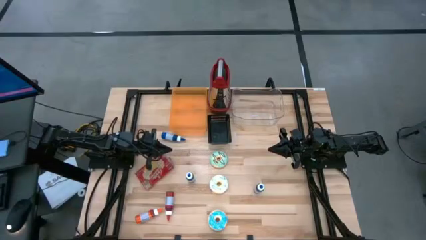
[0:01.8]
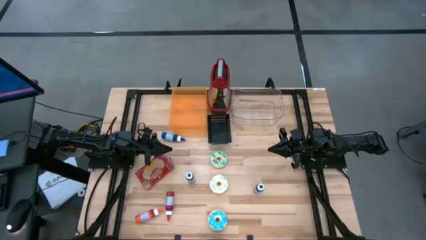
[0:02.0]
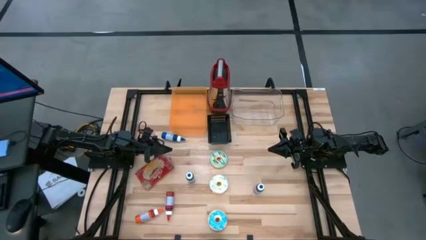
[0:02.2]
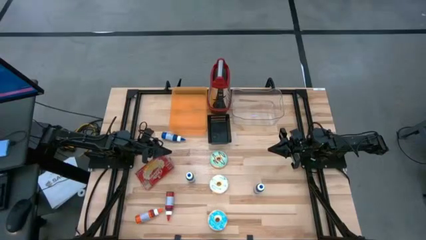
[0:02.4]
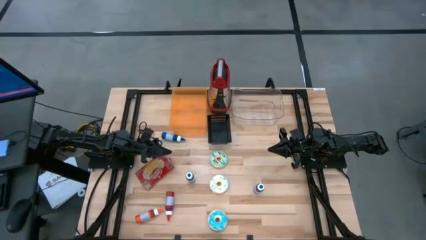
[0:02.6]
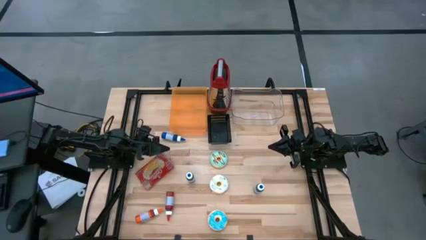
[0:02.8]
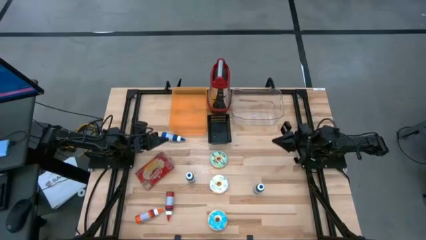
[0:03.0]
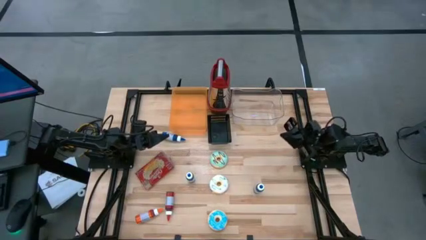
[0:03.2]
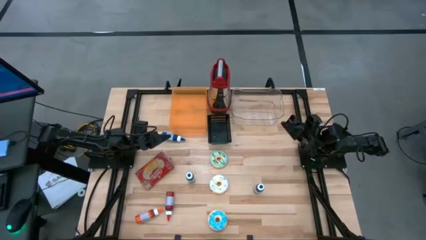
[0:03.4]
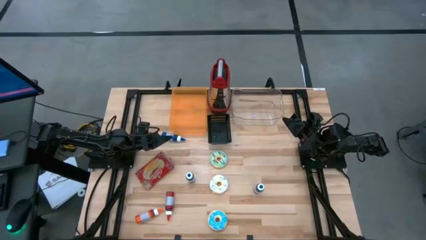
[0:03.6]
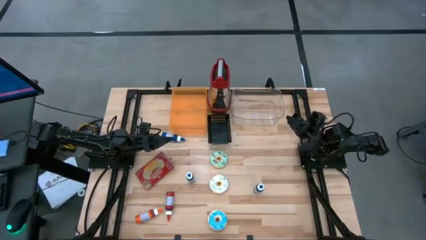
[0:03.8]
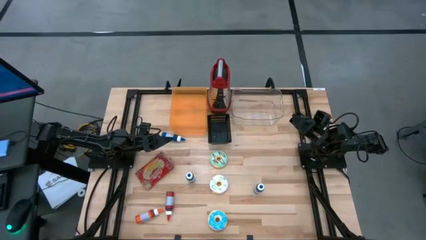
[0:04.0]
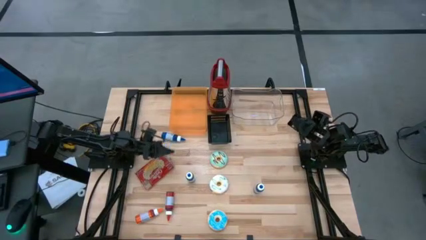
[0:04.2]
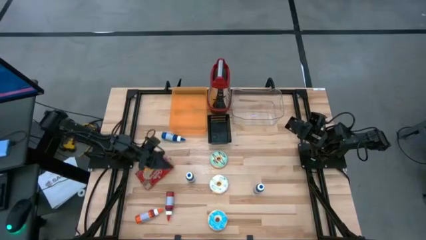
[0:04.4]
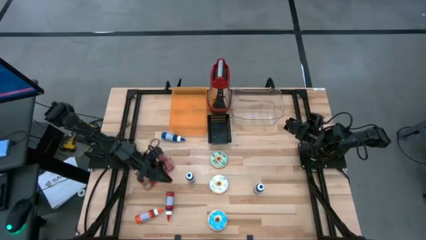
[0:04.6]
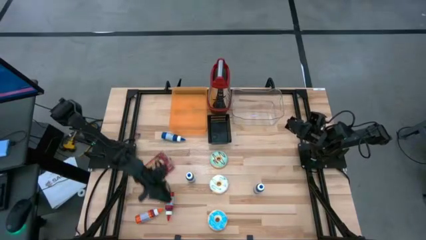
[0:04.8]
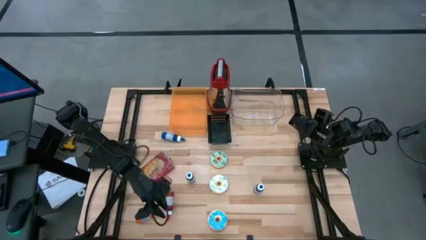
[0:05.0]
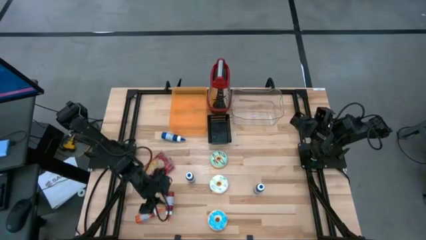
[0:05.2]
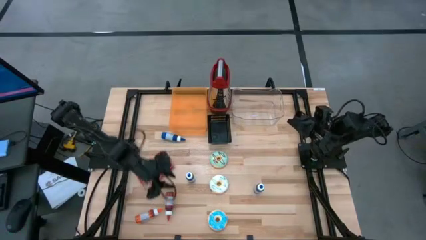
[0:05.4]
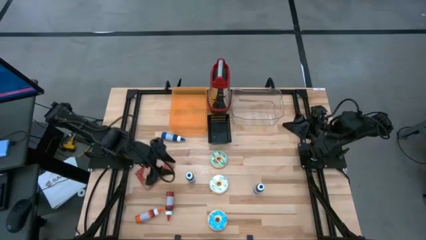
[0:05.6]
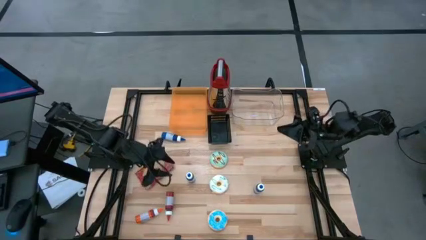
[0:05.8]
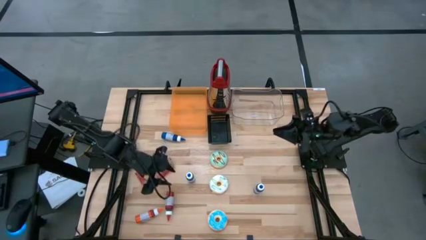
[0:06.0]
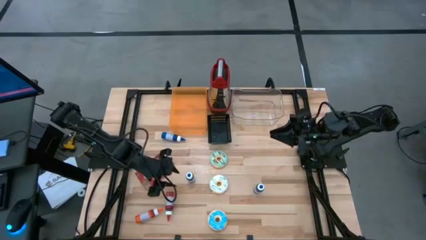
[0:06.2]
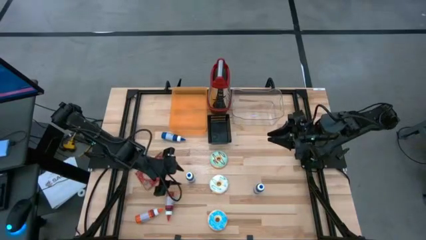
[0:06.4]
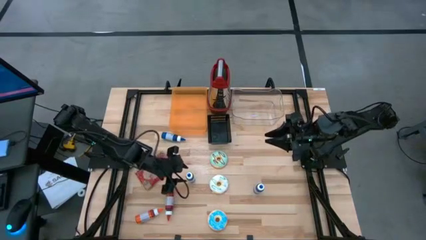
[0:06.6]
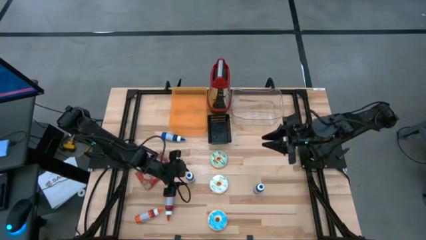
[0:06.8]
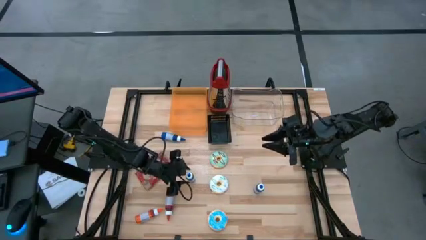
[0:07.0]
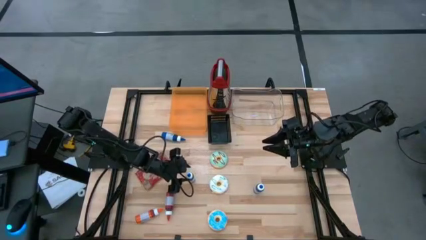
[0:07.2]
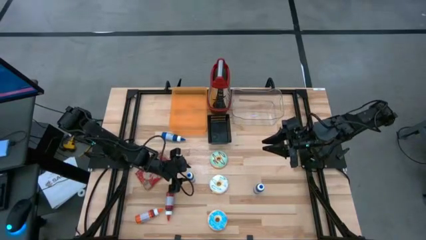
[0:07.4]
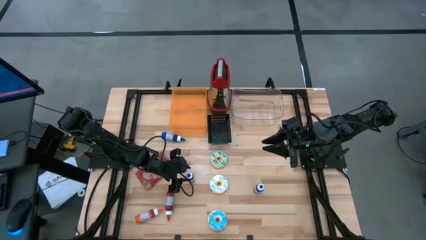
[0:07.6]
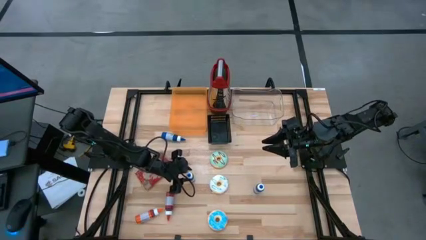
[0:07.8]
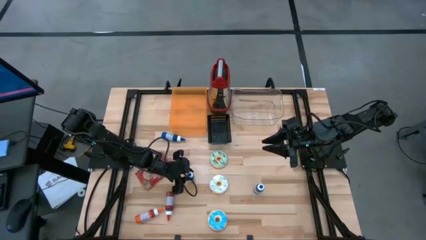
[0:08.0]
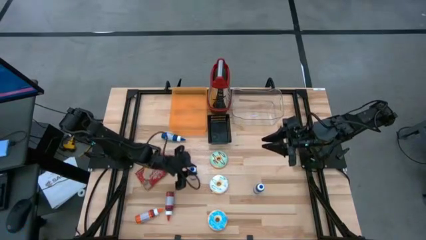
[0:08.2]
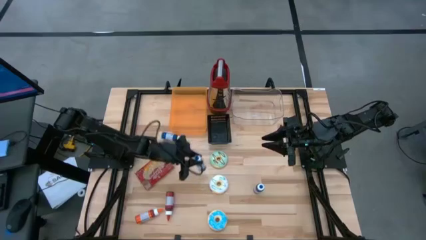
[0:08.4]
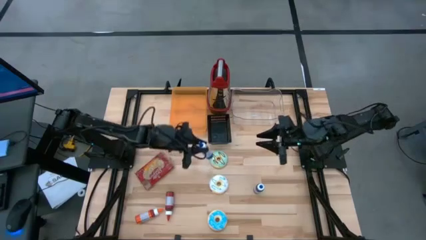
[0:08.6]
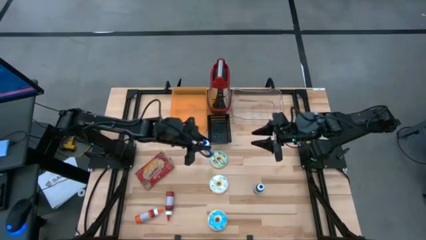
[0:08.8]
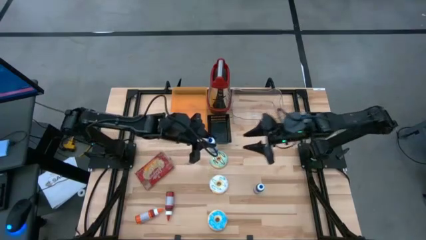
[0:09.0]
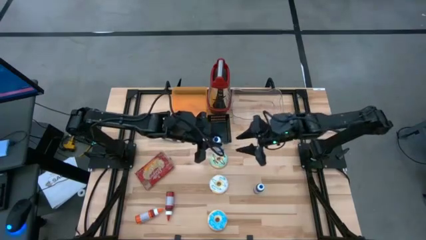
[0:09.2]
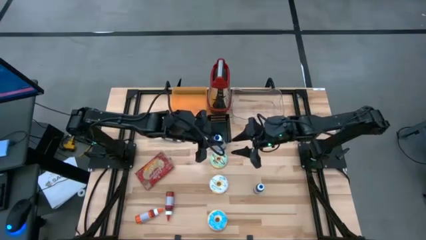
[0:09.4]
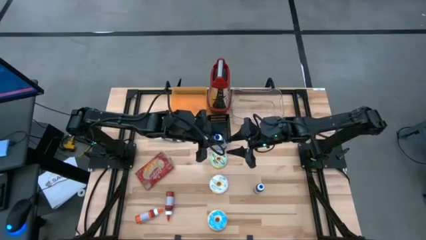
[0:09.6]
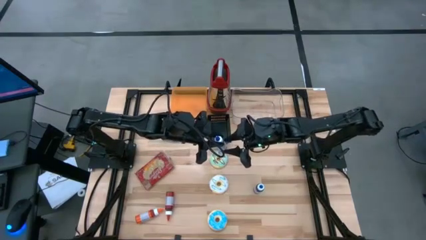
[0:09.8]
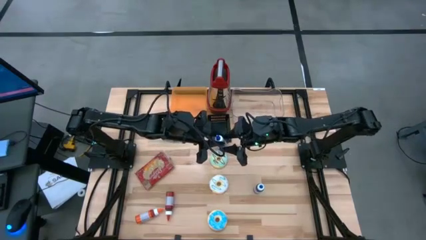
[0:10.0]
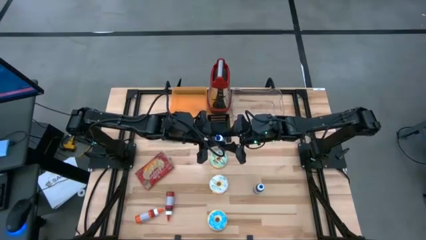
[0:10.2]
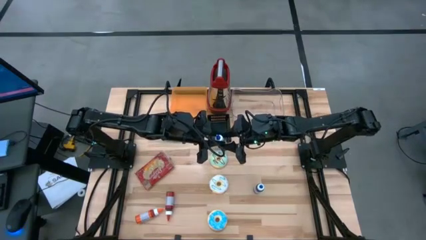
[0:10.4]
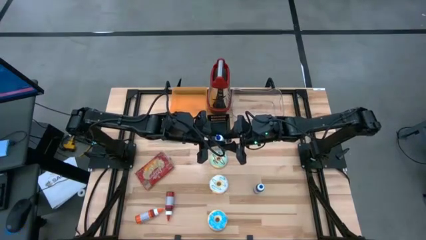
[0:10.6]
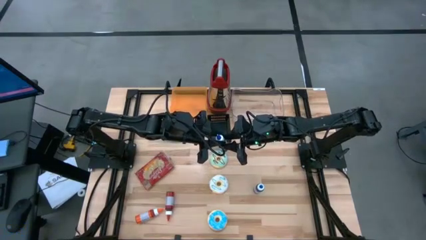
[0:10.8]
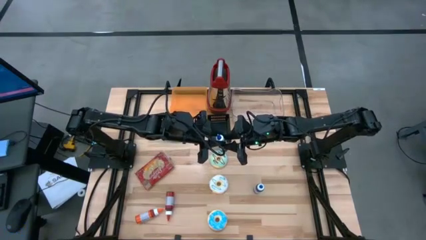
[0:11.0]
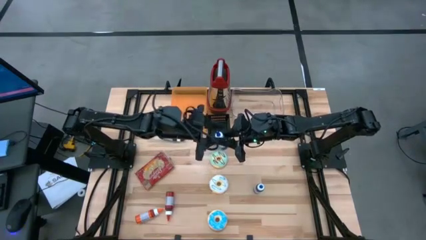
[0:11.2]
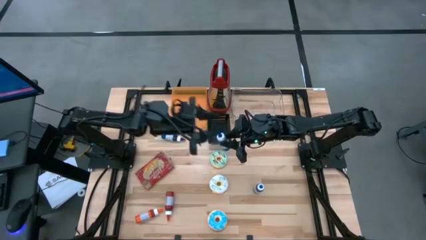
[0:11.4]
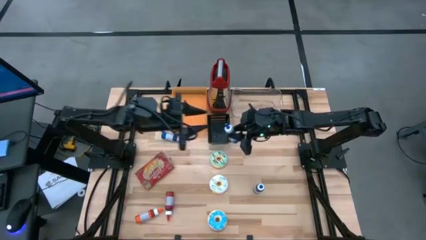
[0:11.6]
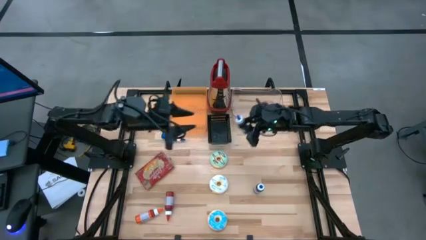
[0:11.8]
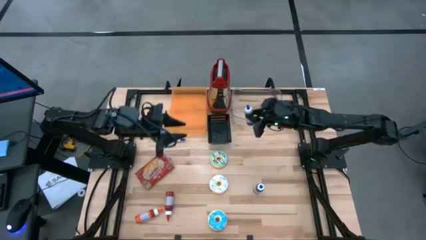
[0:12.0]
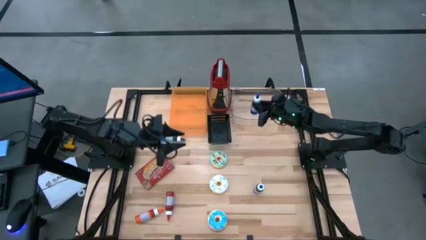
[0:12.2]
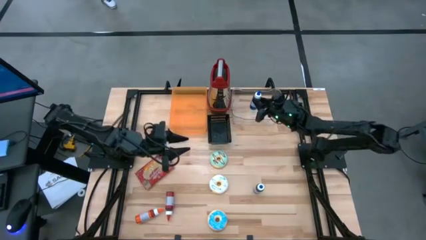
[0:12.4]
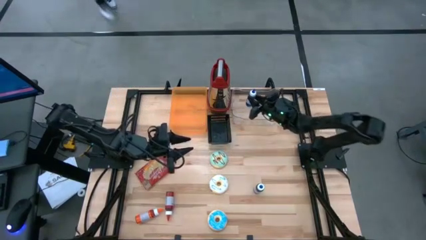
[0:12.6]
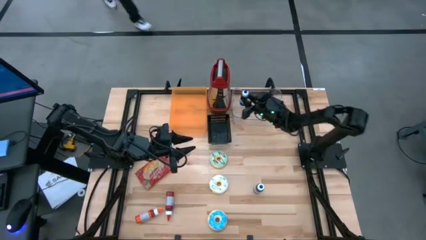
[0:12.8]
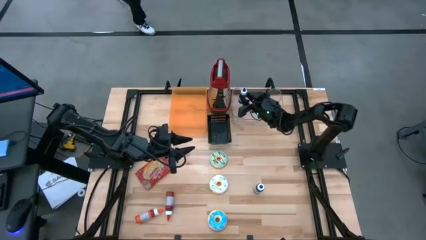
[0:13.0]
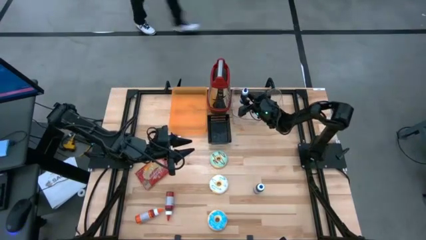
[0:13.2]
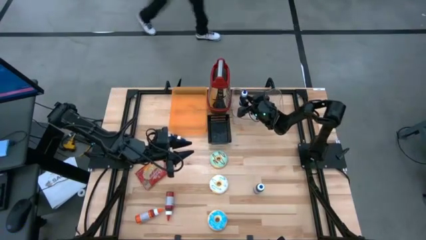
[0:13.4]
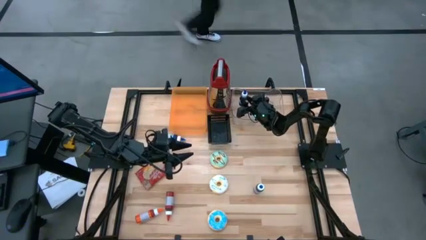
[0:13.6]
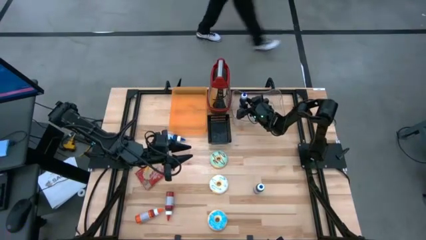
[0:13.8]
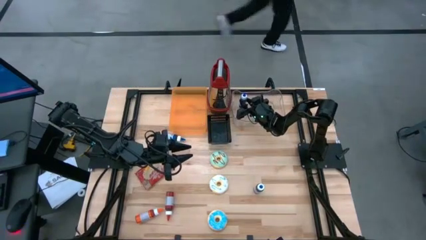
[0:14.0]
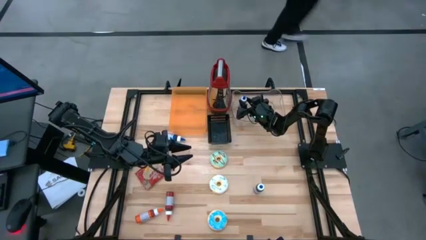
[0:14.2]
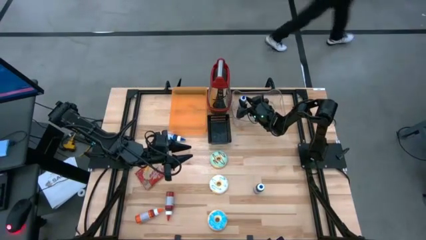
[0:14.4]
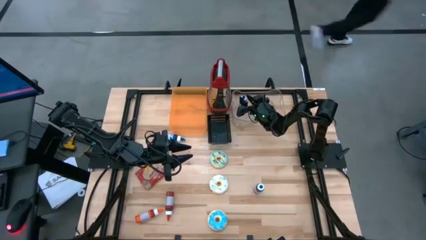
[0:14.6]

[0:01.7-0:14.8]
Put the bottom left blue food coloring bottle into the transparent bin
